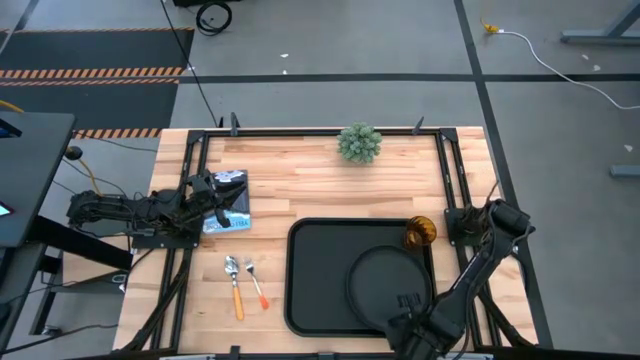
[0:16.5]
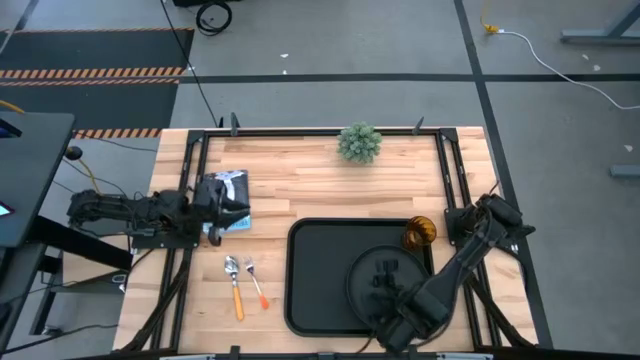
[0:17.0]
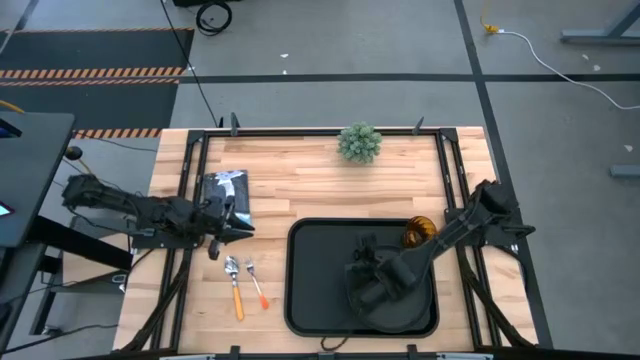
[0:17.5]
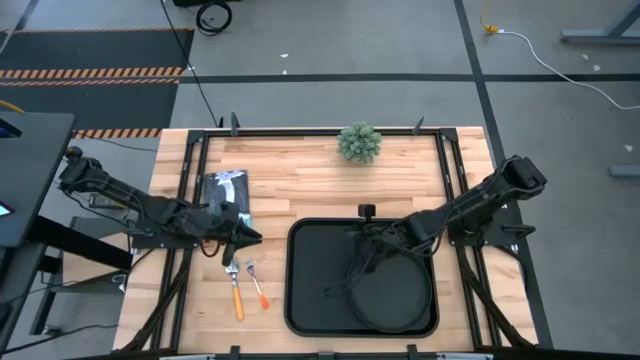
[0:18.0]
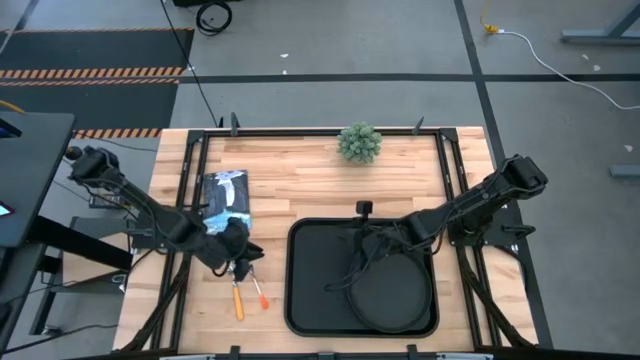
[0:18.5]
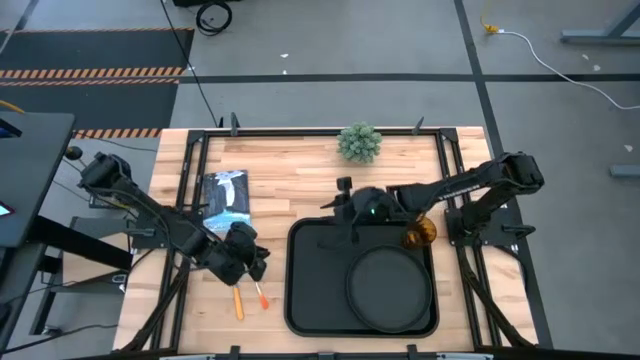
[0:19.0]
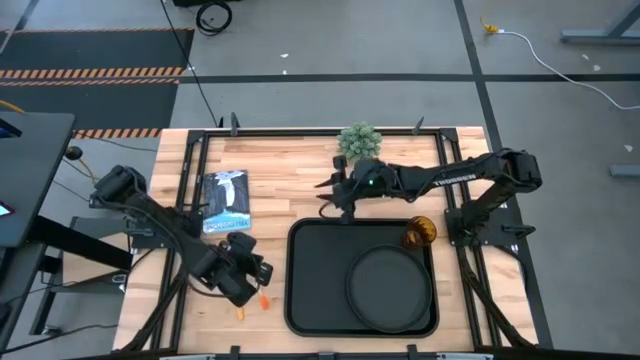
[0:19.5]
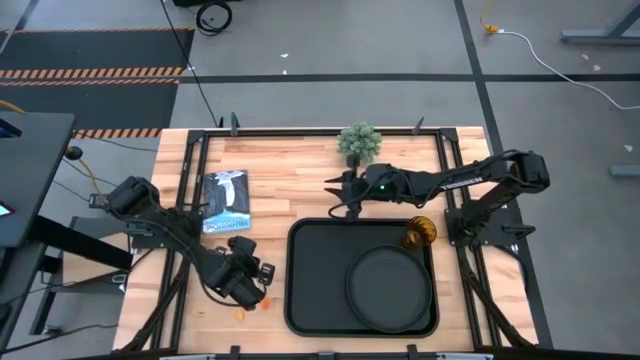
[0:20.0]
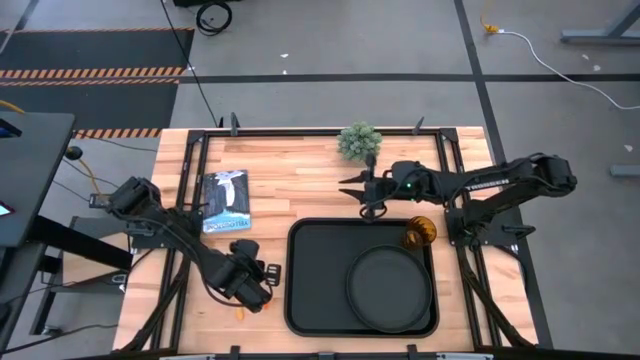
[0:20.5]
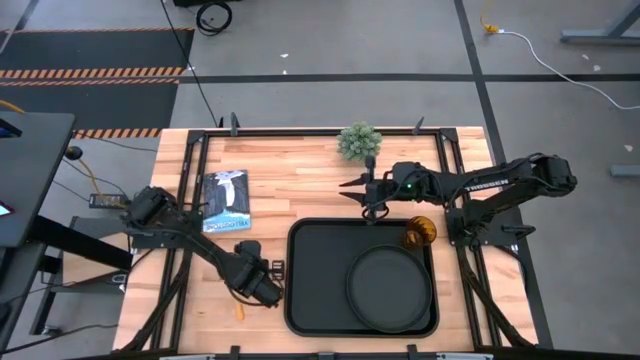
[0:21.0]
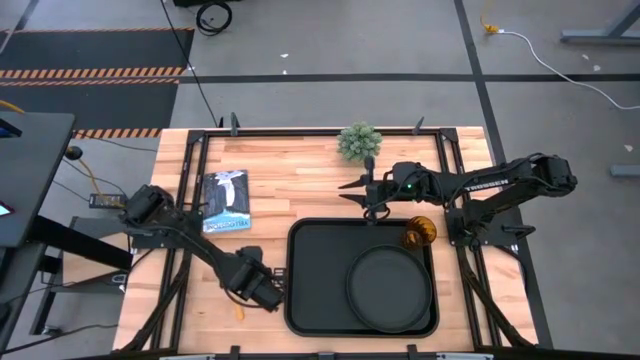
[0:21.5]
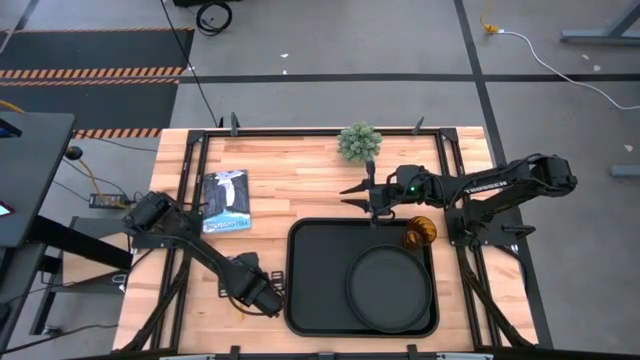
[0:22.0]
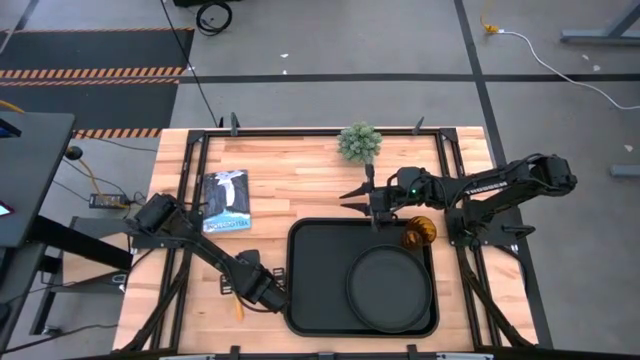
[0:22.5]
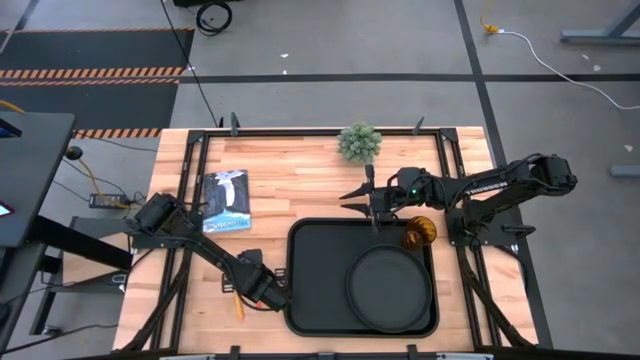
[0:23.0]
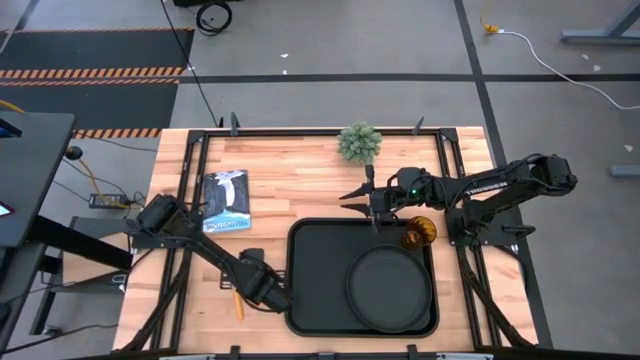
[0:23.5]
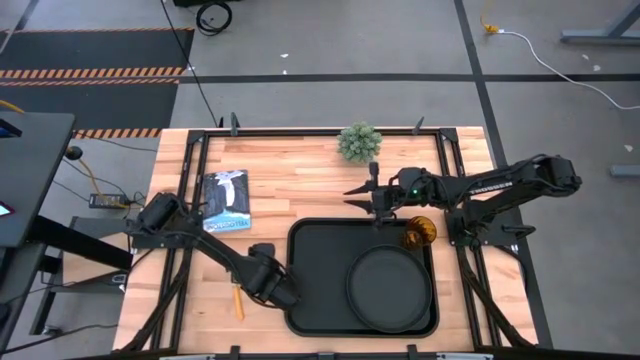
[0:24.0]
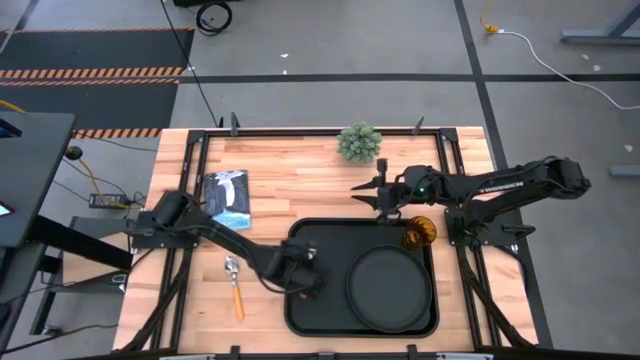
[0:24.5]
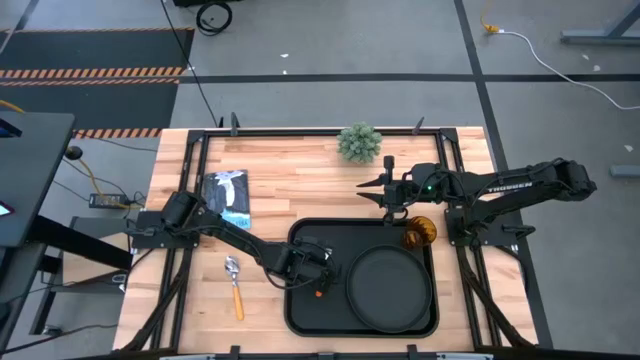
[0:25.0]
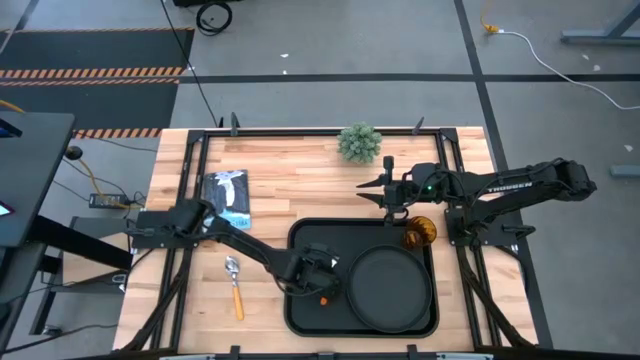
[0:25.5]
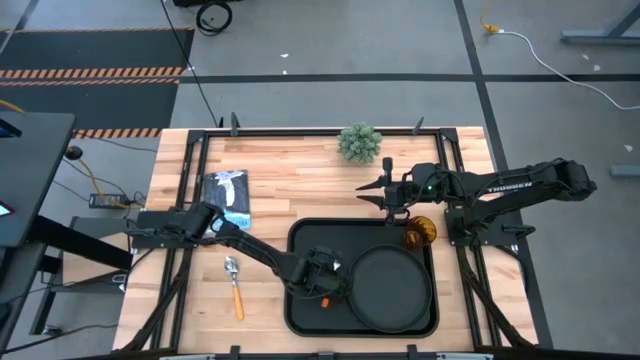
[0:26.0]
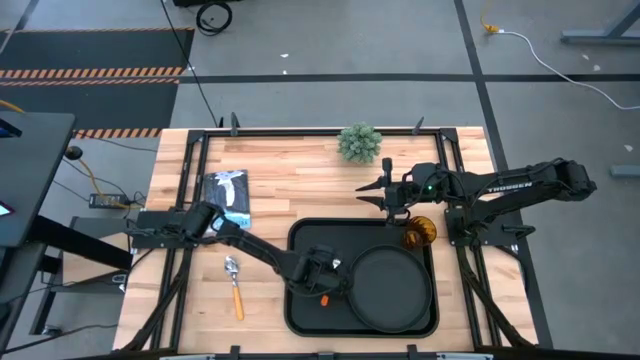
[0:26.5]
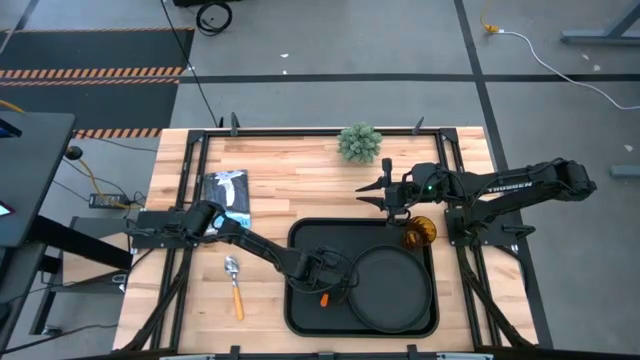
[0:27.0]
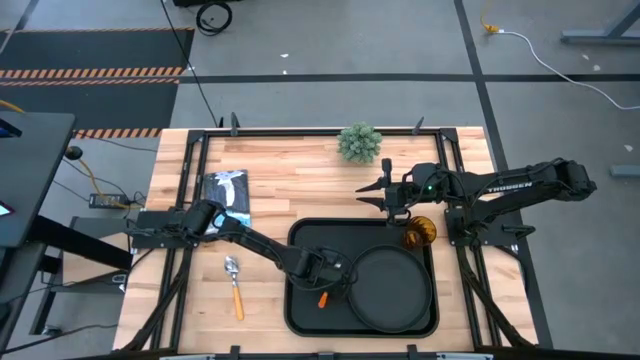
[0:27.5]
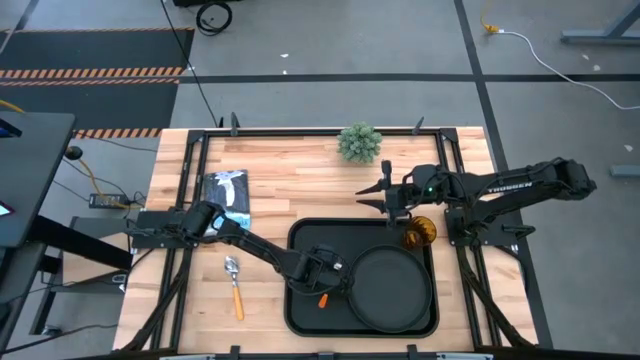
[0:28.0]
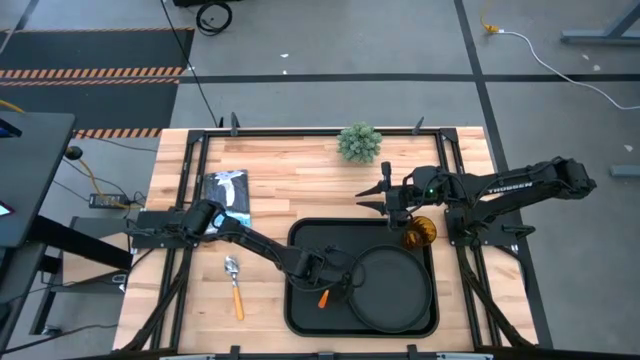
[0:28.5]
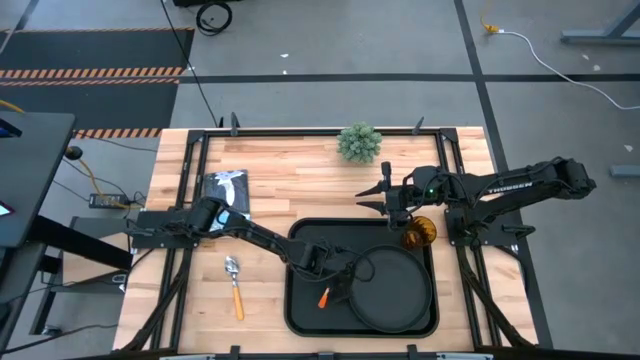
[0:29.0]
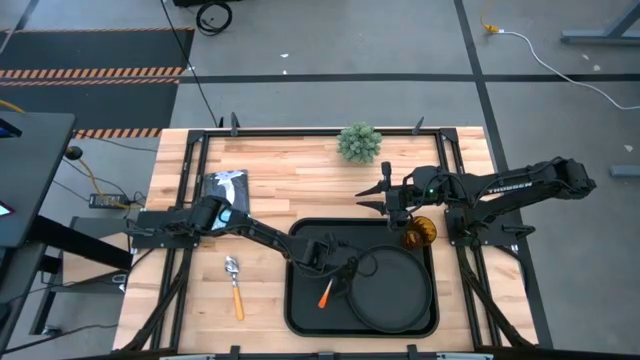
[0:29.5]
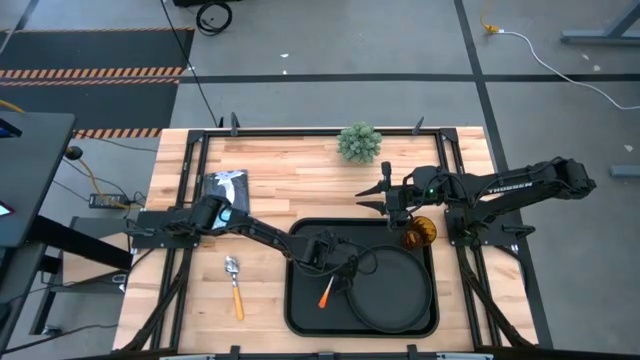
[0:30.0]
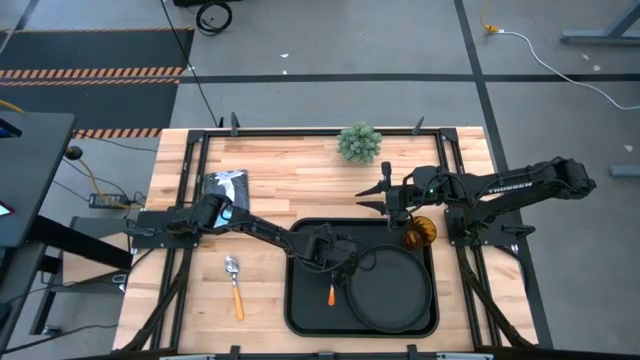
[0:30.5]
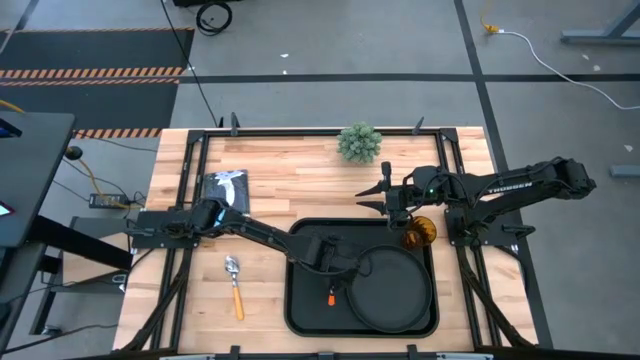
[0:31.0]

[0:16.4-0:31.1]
Task: Pick and place plate/cup/fork/spoon on tray
Put the orange fork on the black tray to the left of the black plate

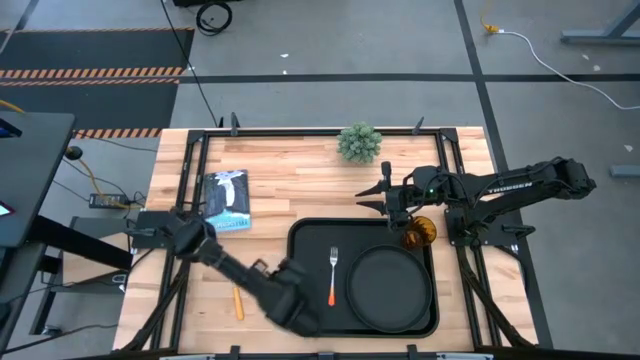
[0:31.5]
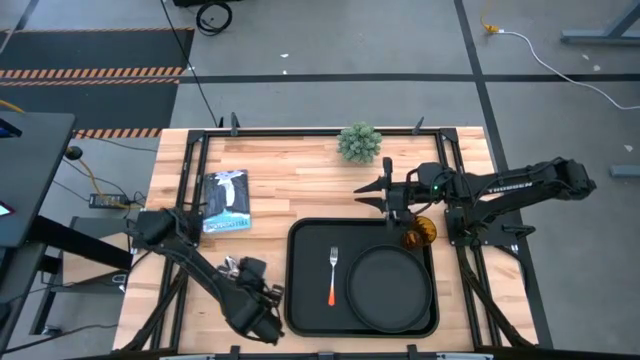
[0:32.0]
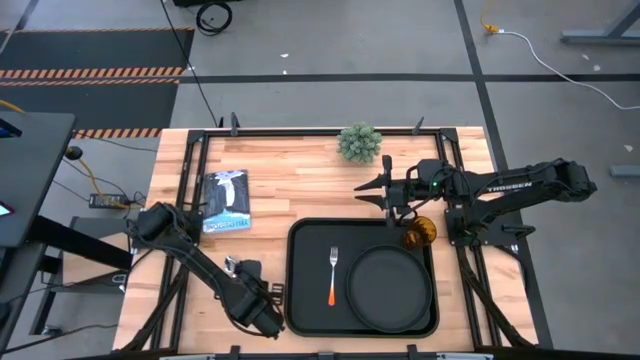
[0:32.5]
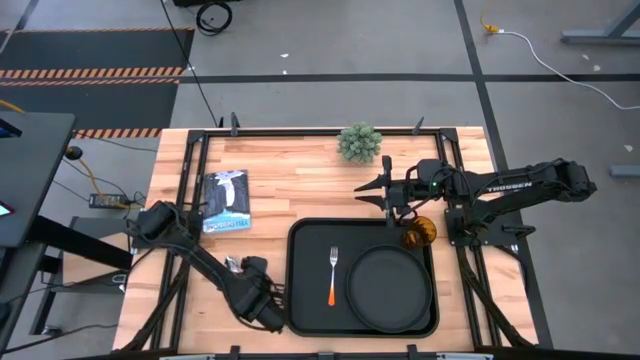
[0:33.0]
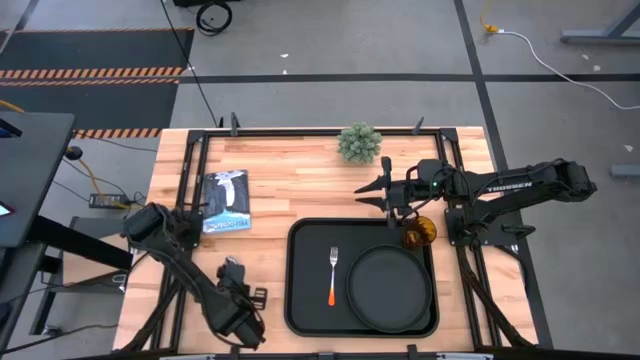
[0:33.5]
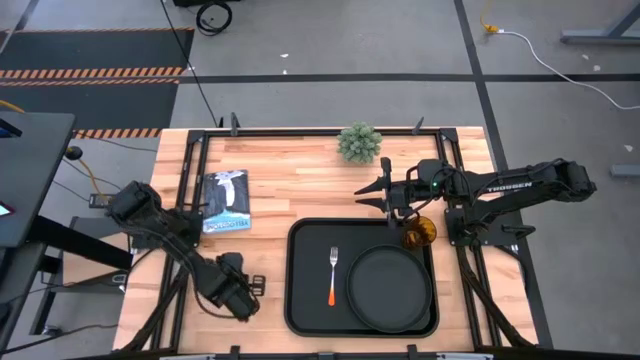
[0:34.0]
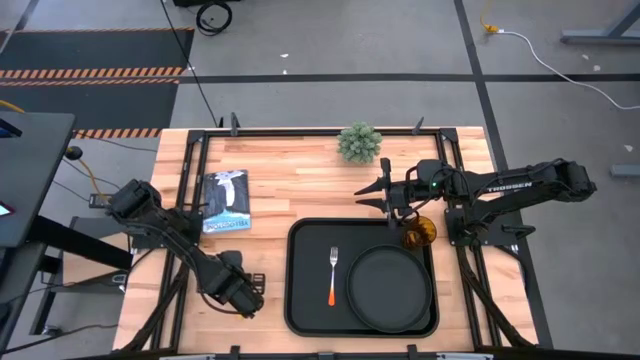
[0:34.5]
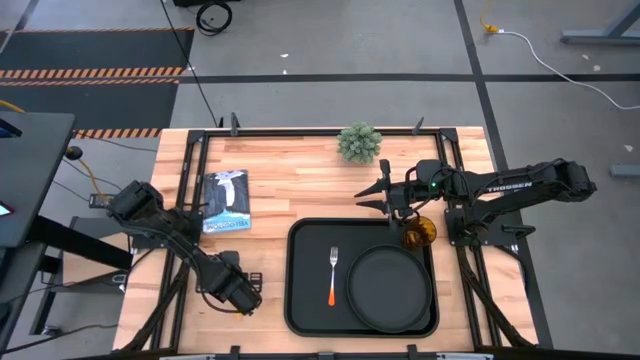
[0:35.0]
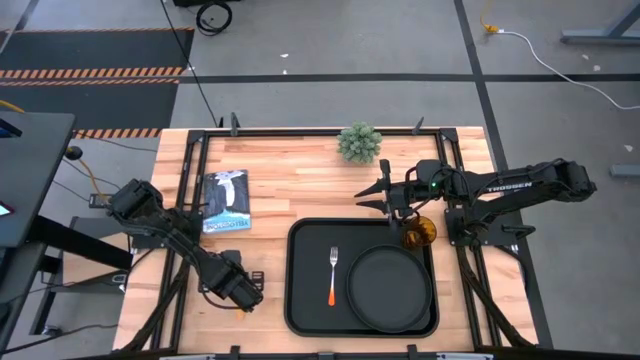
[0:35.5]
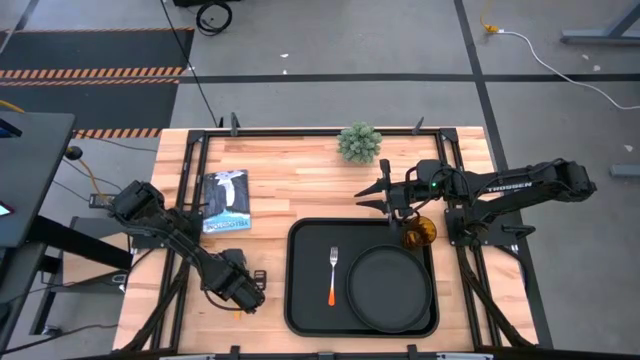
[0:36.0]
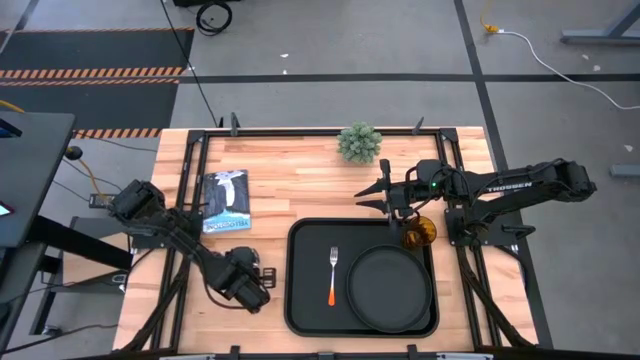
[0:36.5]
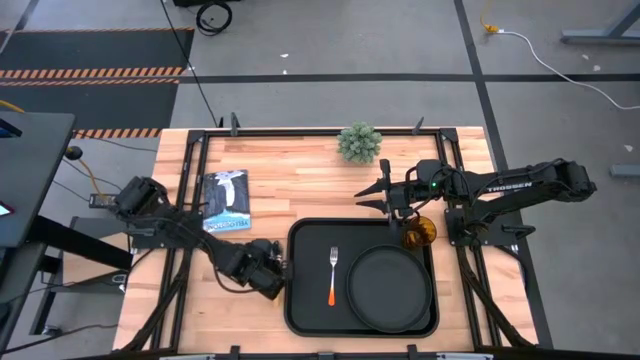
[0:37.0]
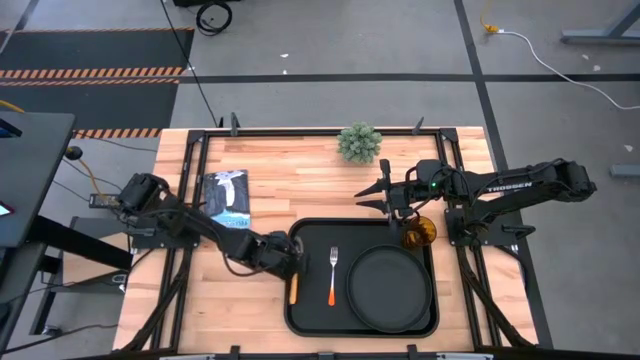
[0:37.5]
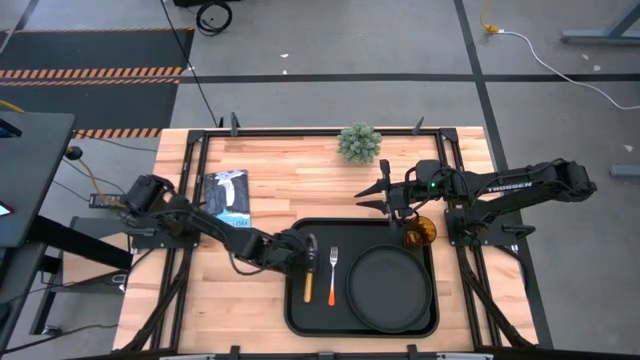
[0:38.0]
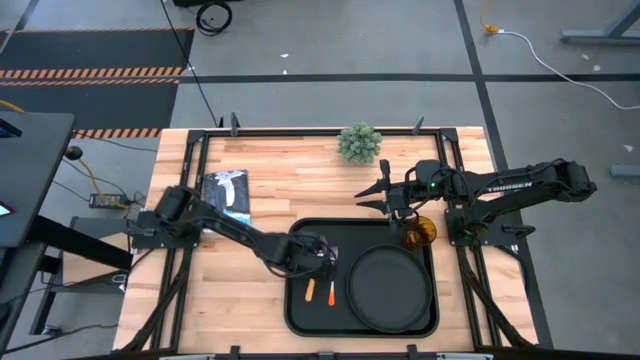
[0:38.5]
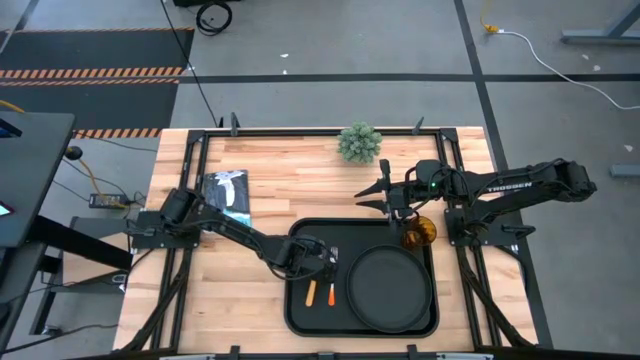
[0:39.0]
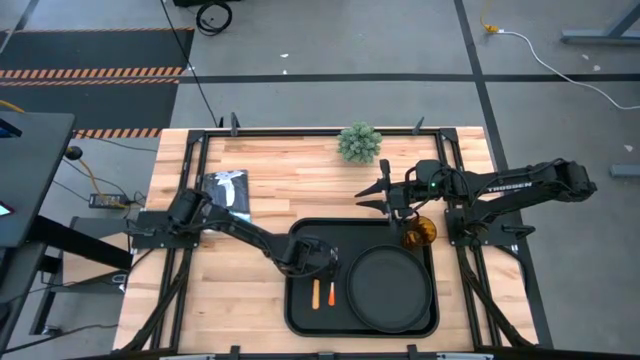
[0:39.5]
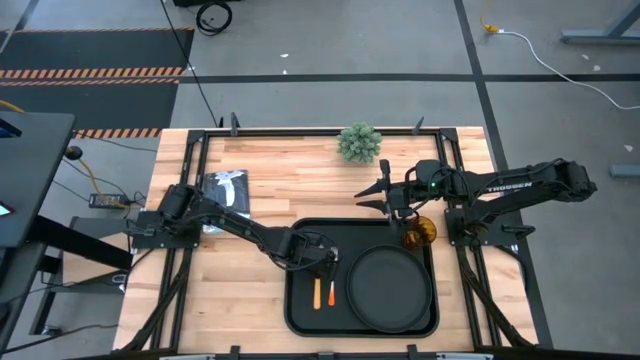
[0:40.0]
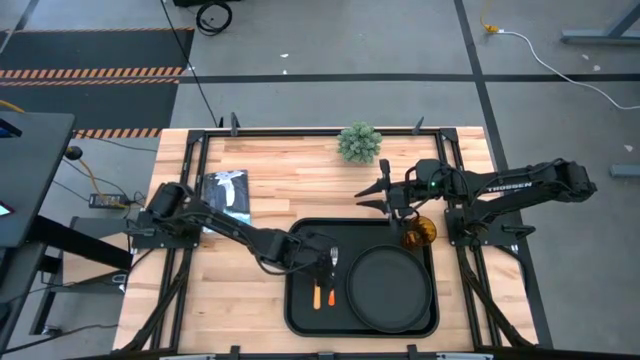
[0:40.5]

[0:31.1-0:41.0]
Put the light orange on the black tray spoon to the left of the orange fork
